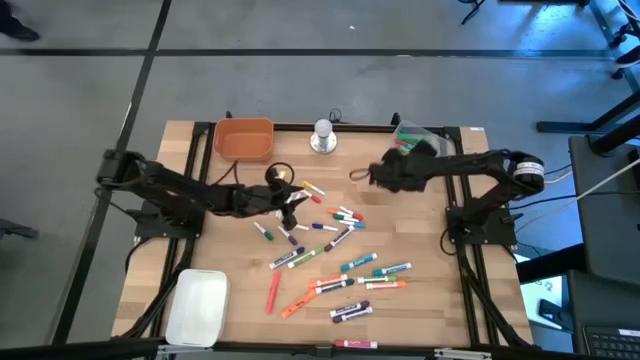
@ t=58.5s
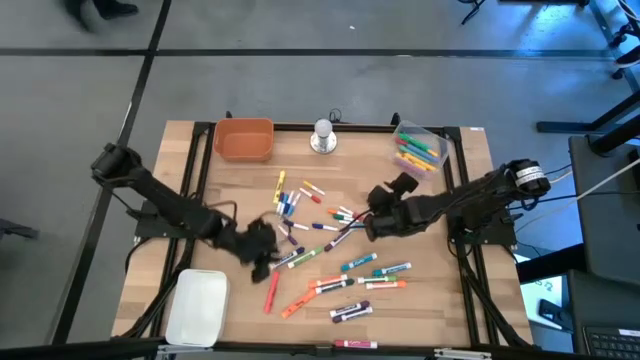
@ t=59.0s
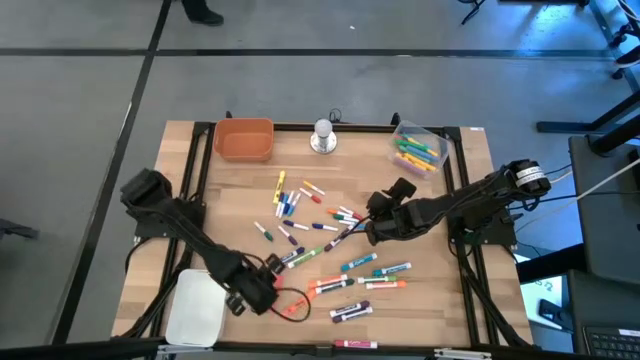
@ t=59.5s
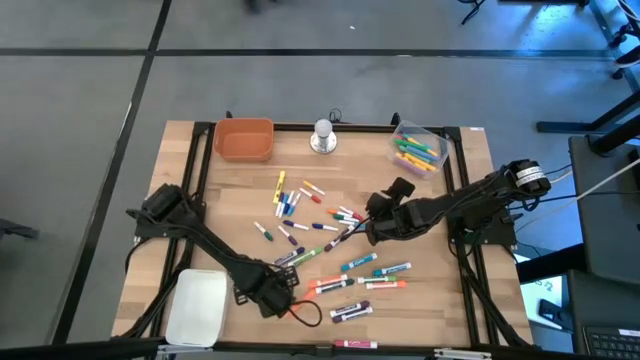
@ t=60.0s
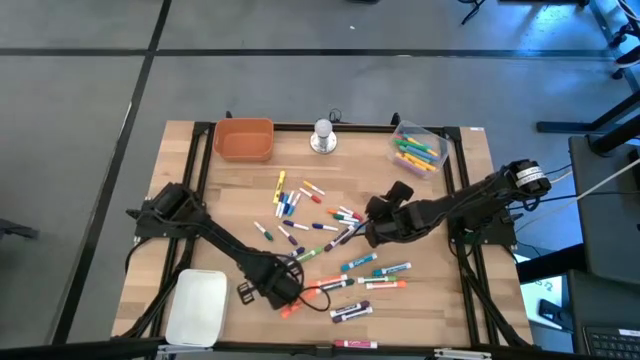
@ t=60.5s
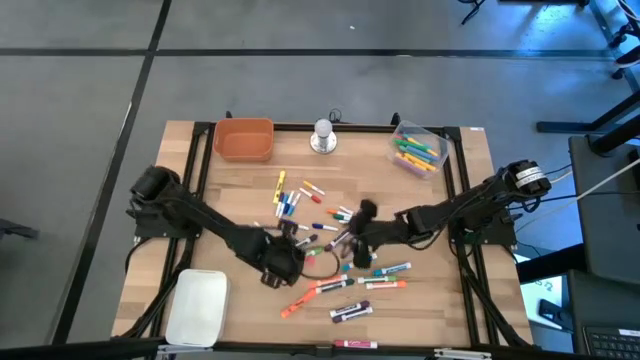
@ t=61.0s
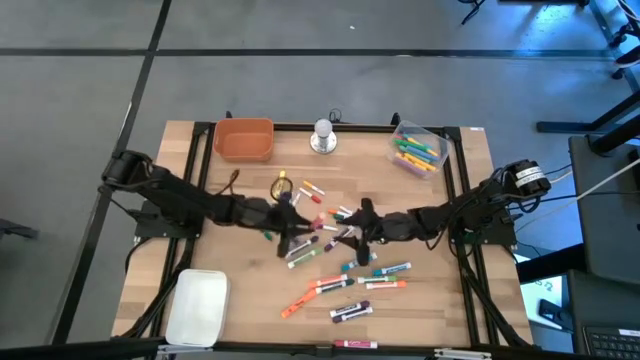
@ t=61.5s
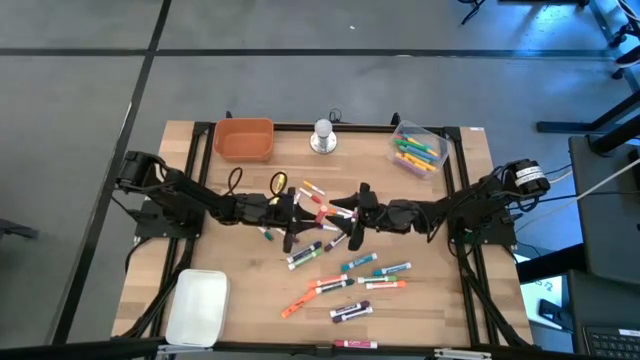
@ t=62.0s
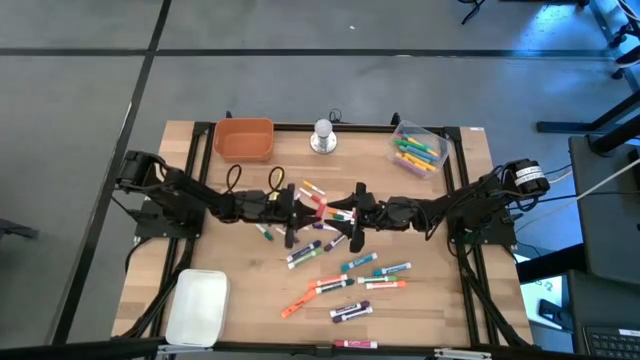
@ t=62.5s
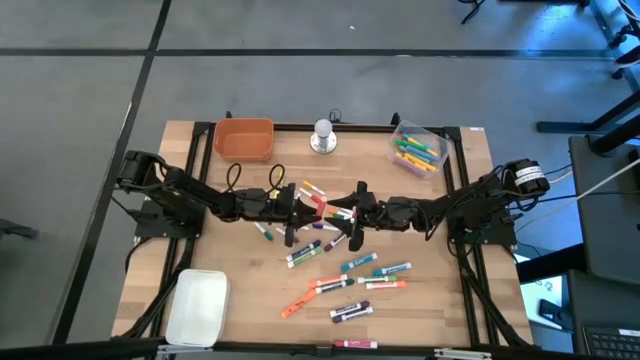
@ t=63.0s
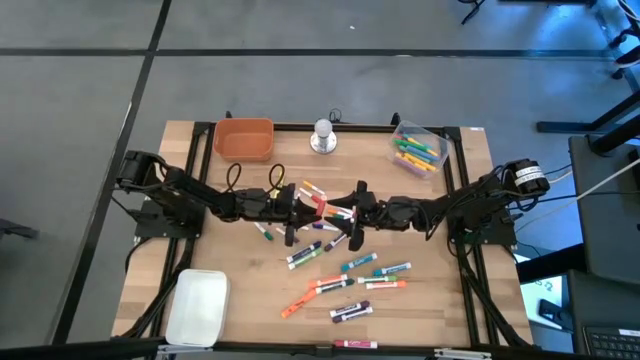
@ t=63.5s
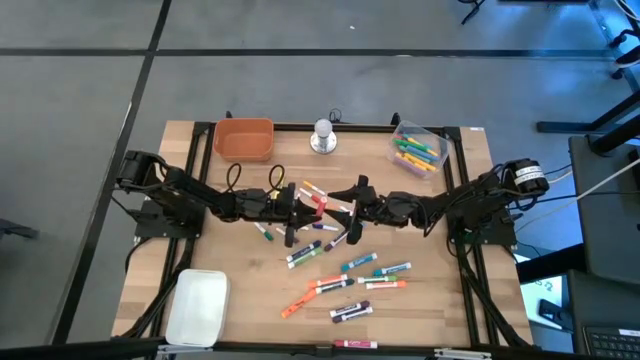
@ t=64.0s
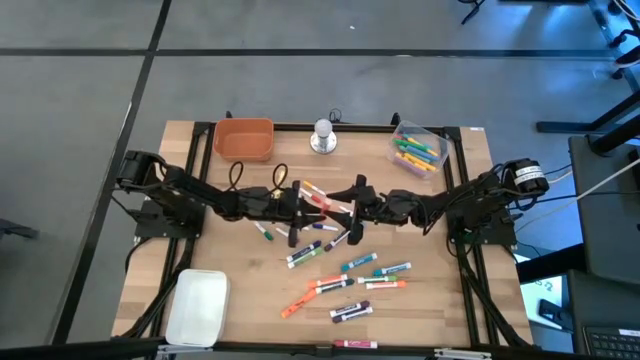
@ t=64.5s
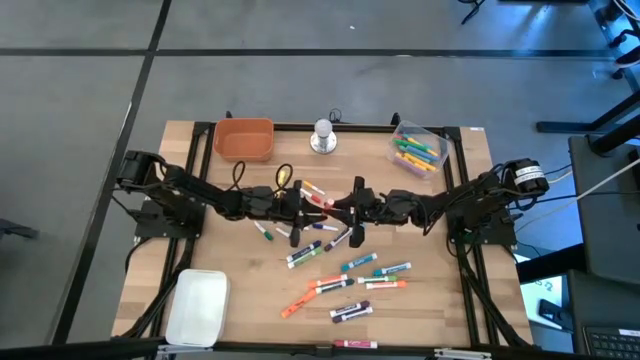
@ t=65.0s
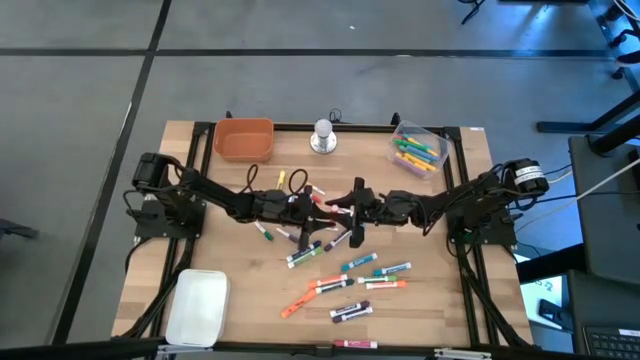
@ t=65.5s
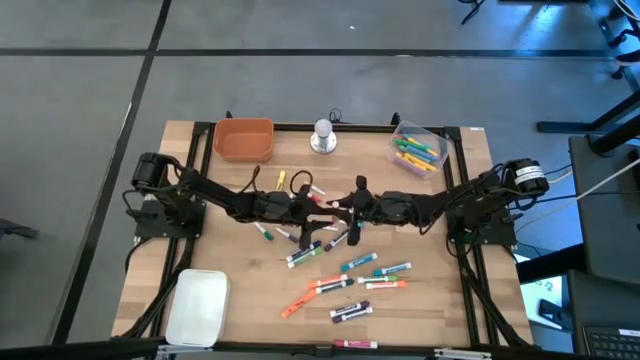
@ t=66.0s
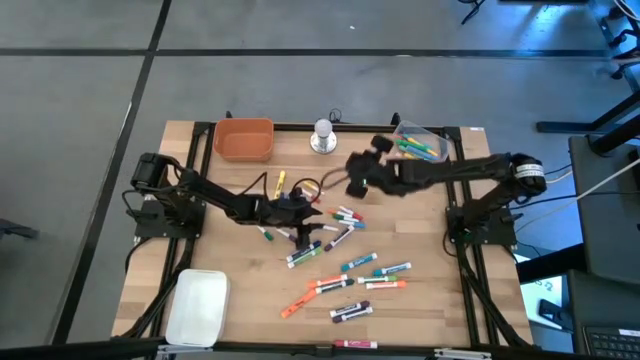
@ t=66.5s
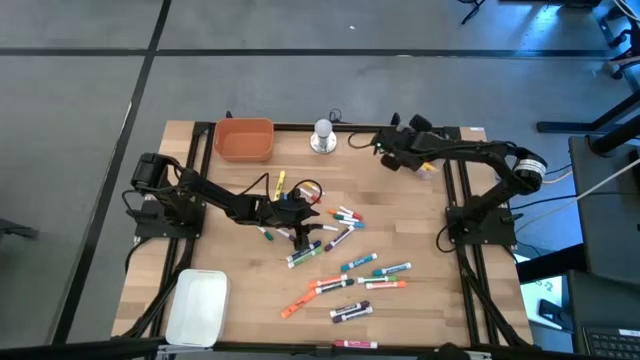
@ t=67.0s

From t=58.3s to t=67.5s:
Task: Pick & Place Markers
Put the large pink highlighter pen into the transparent bin

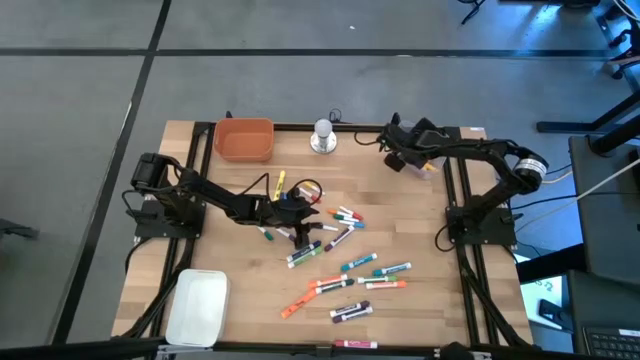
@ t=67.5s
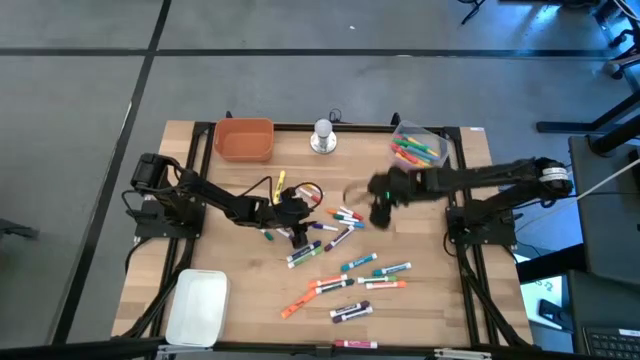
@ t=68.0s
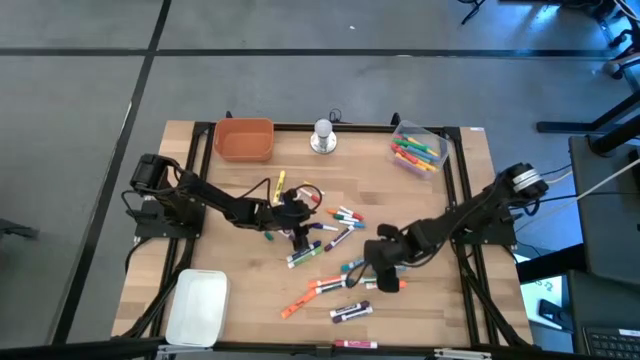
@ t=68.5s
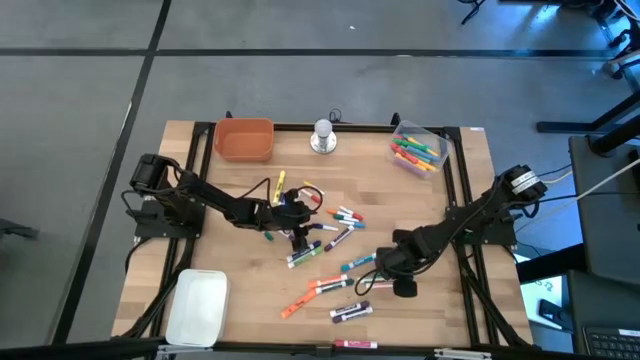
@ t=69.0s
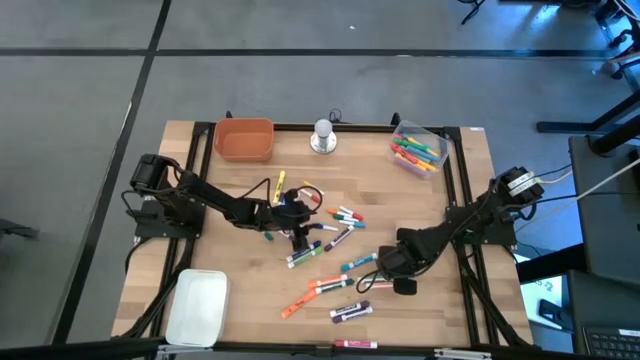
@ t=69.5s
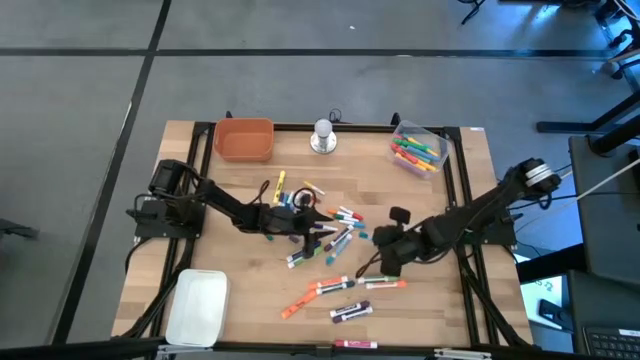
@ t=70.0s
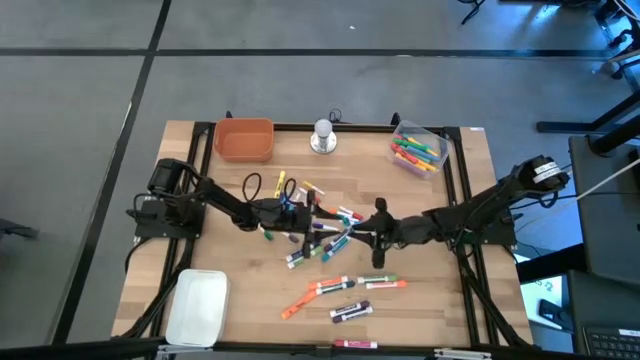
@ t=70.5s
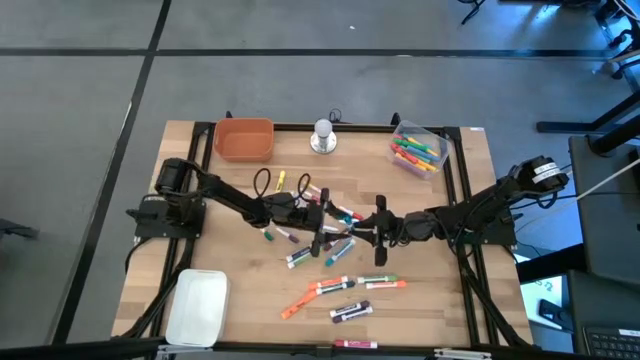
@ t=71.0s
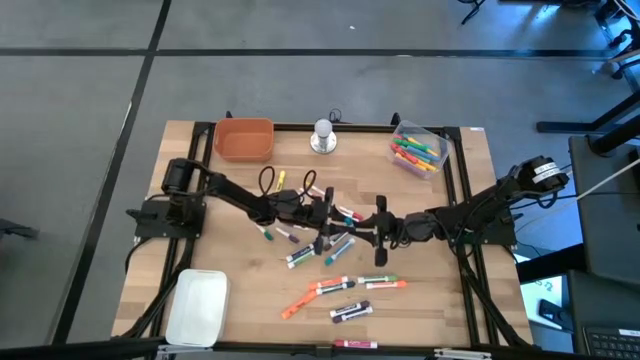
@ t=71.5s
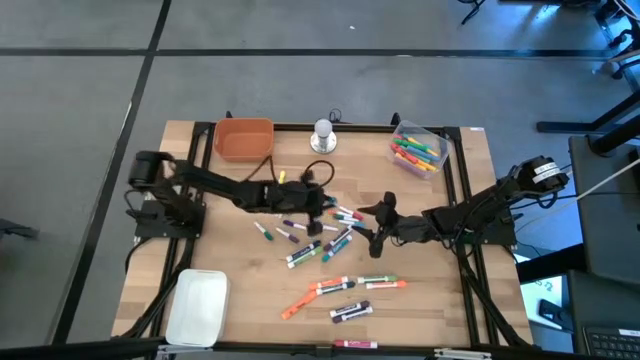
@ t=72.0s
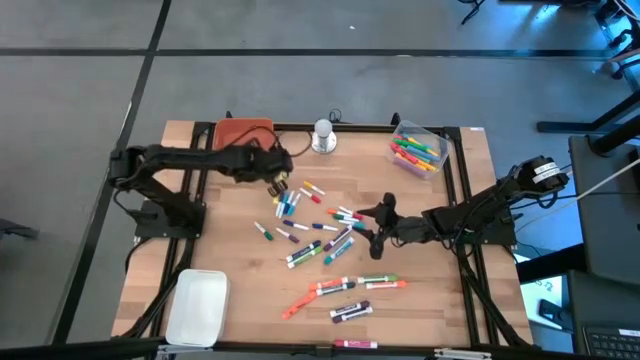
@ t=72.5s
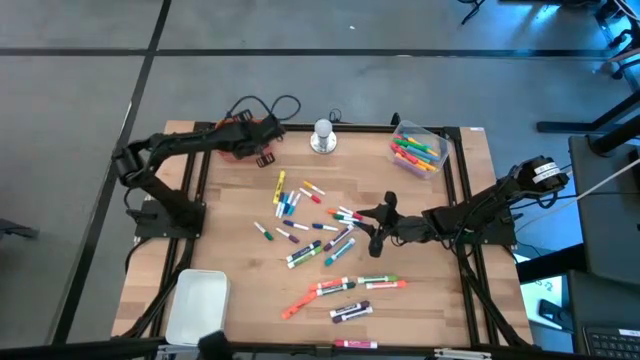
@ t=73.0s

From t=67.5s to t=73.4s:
Put the light blue marker pen into the orange bin

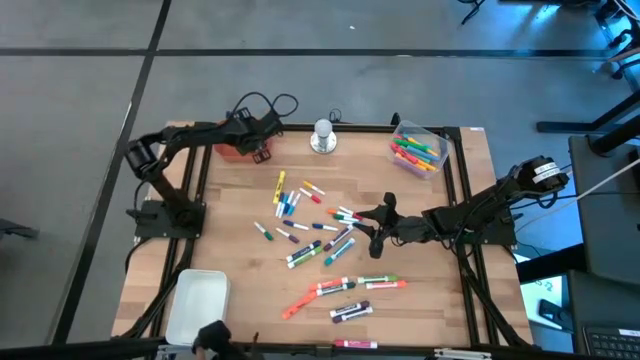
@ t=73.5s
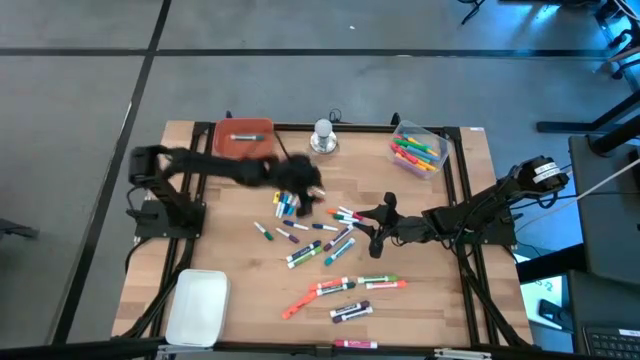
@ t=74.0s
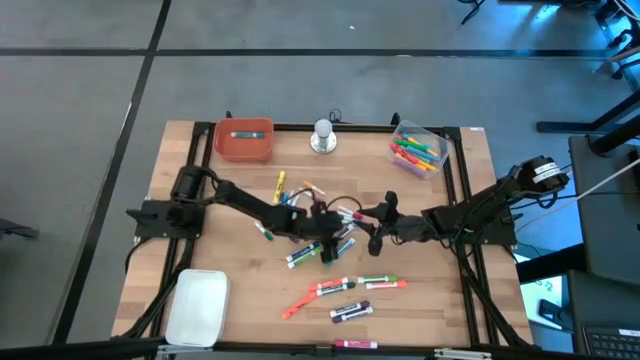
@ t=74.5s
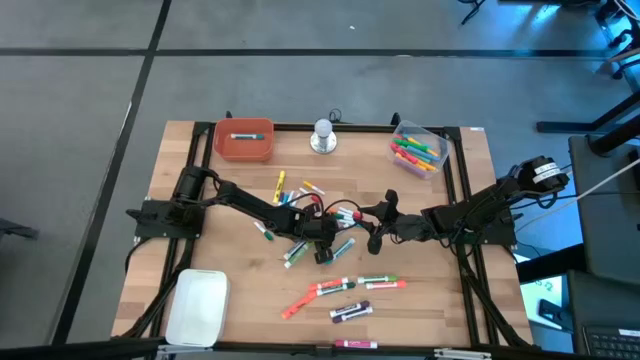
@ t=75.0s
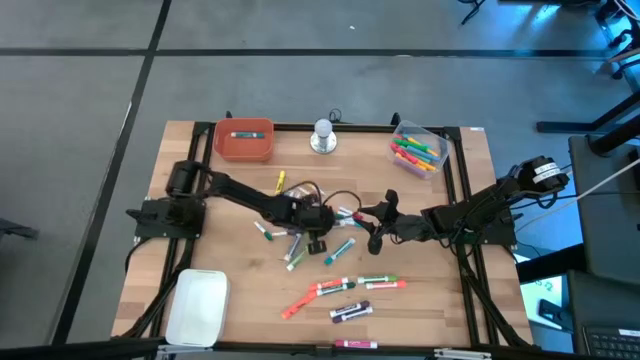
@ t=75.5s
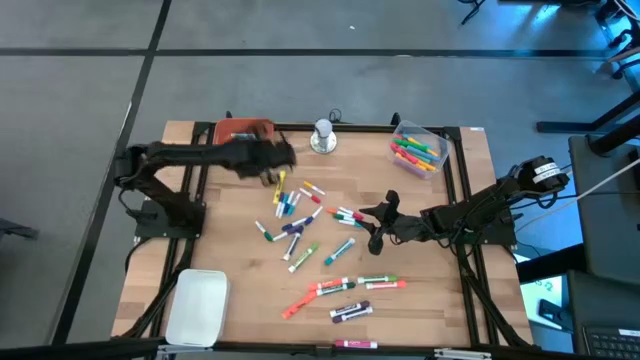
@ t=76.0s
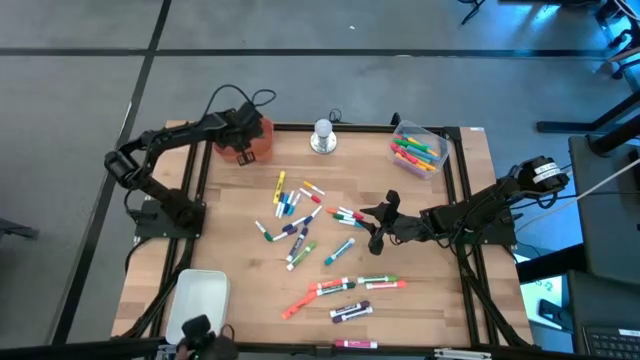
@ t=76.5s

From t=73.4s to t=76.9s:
Put the purple marker pen into the orange bin

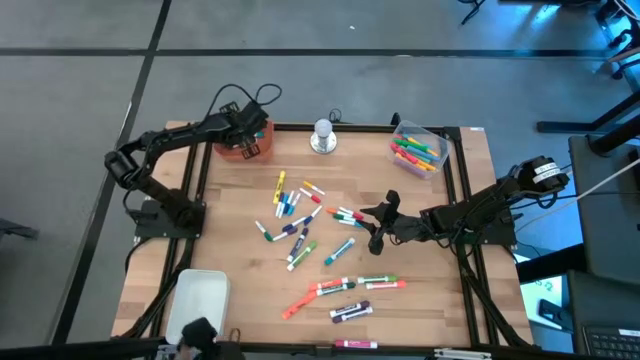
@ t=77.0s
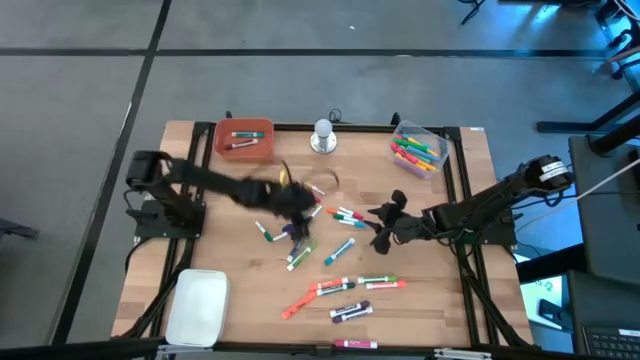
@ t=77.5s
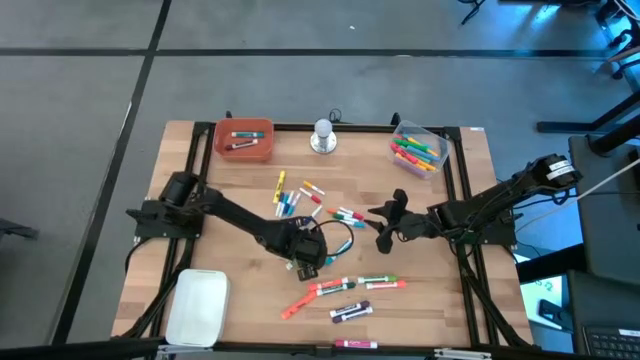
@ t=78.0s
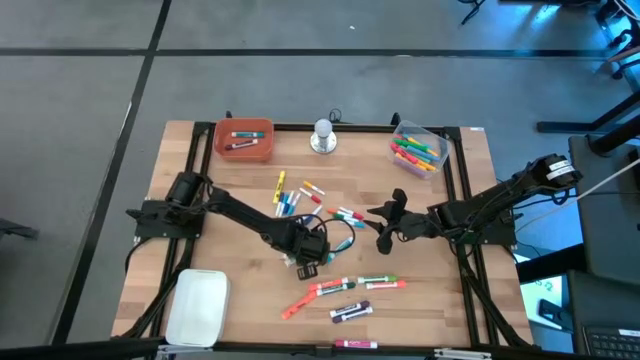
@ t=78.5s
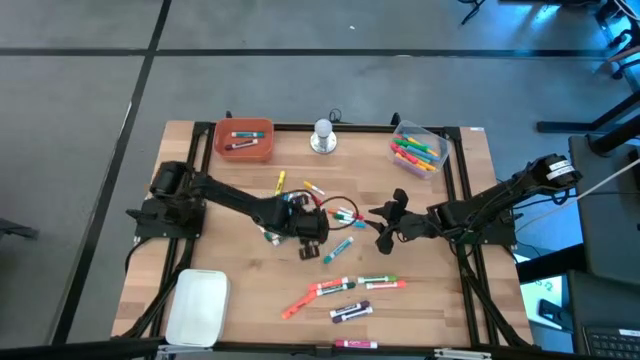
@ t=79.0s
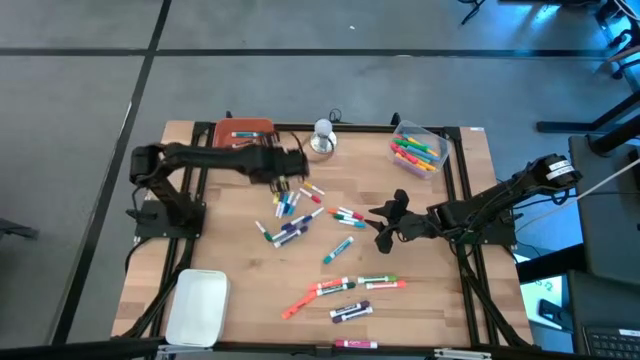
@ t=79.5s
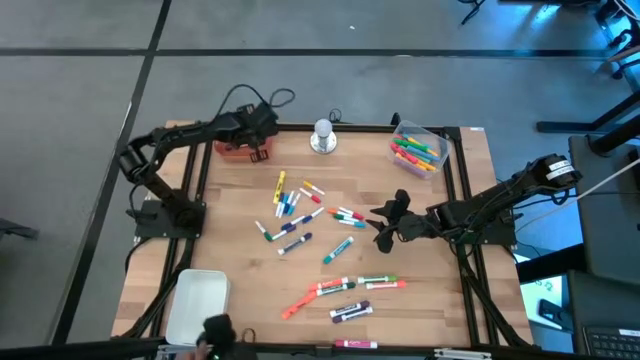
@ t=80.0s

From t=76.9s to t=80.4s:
Put the light green marker pen into the orange bin
